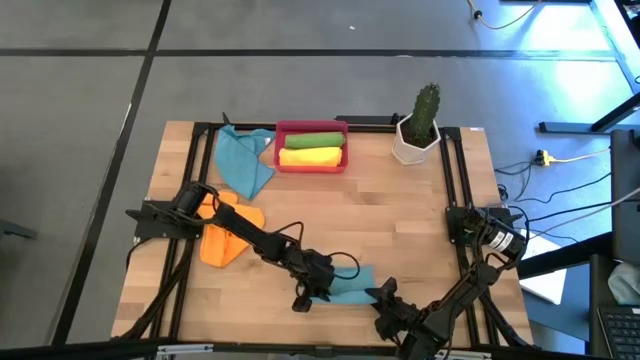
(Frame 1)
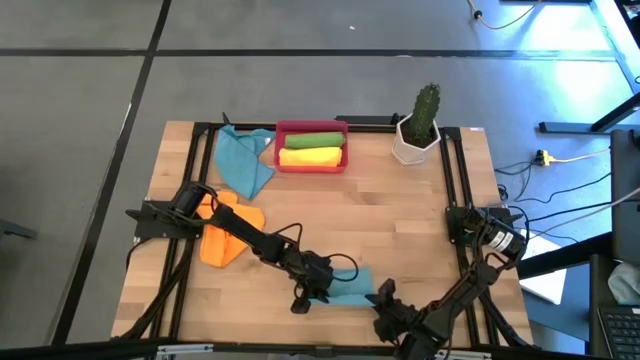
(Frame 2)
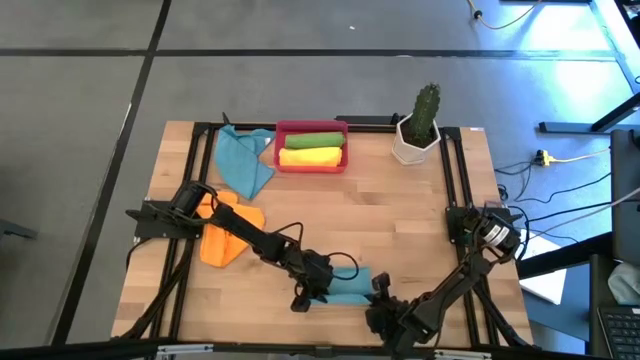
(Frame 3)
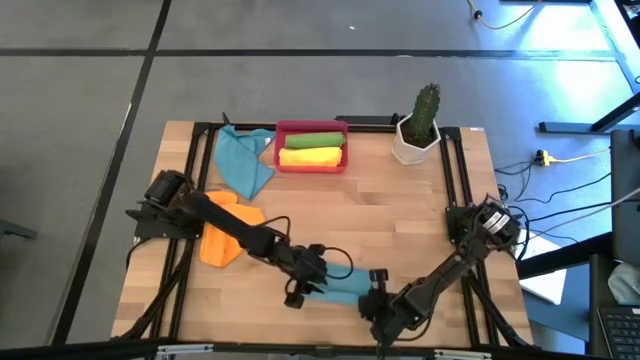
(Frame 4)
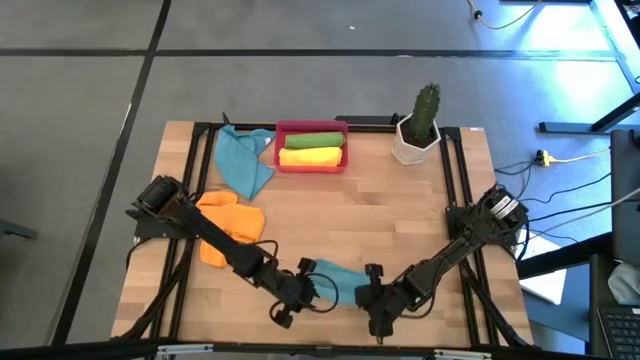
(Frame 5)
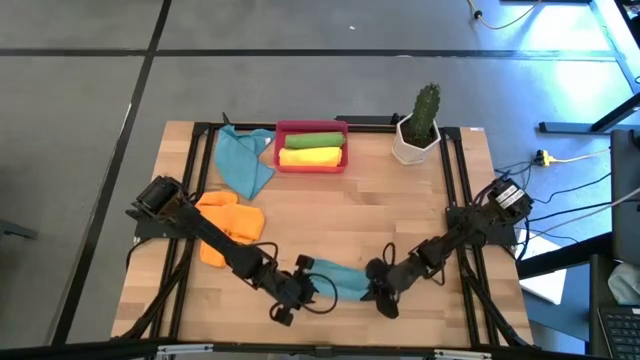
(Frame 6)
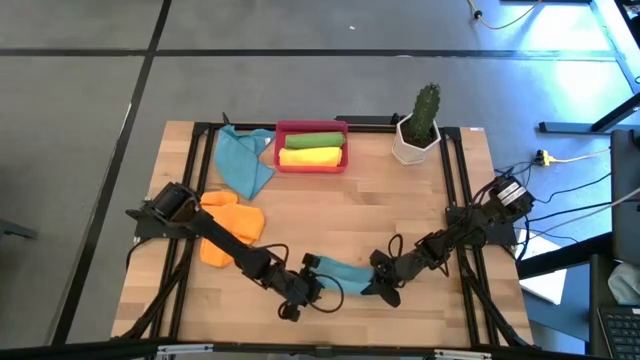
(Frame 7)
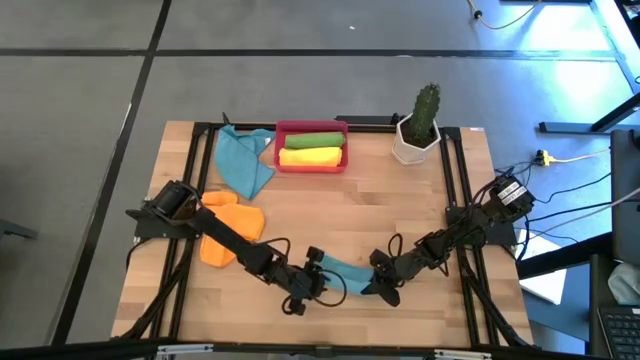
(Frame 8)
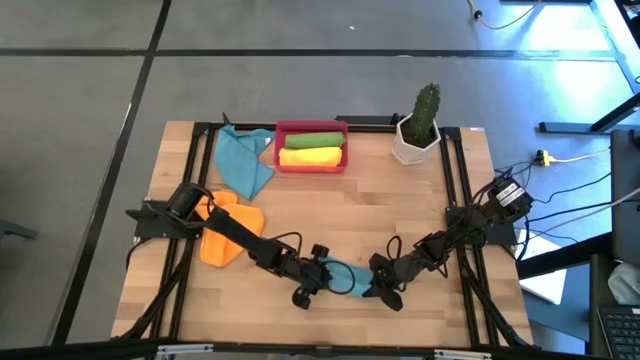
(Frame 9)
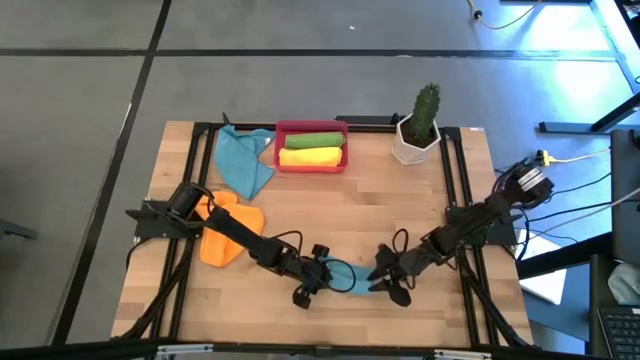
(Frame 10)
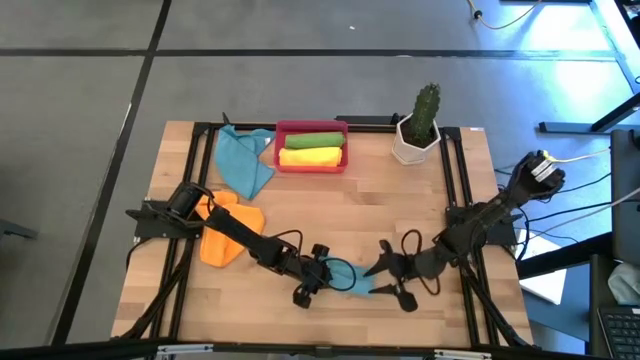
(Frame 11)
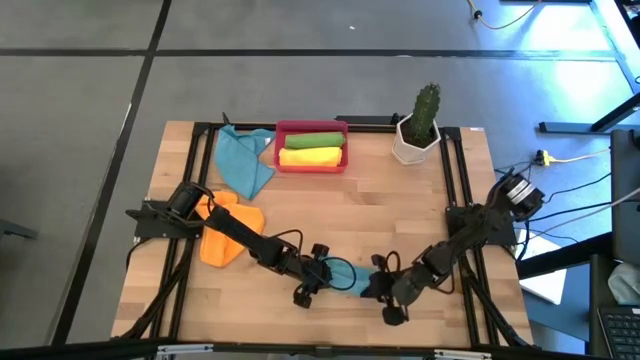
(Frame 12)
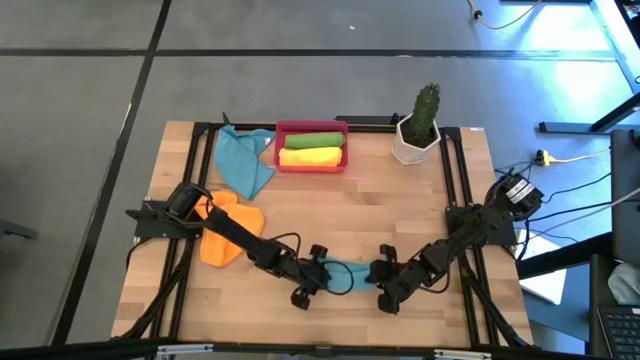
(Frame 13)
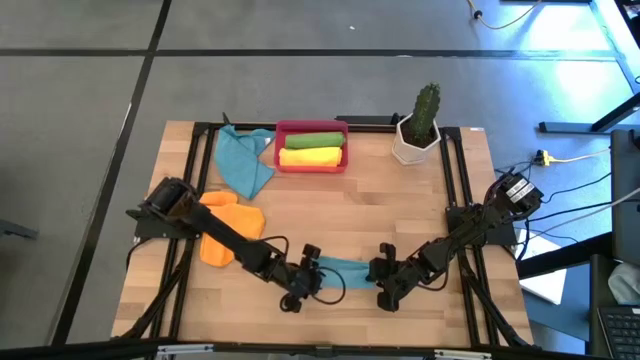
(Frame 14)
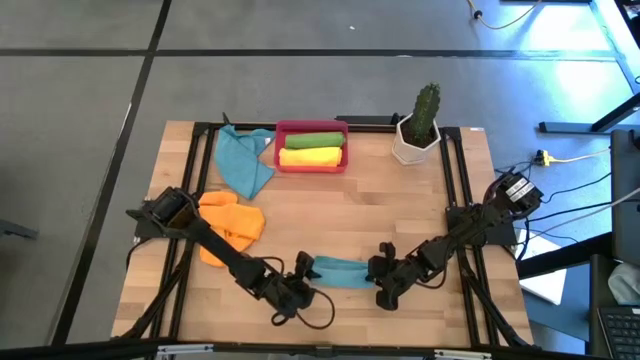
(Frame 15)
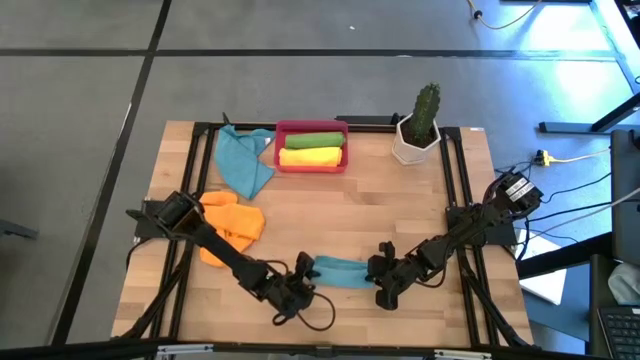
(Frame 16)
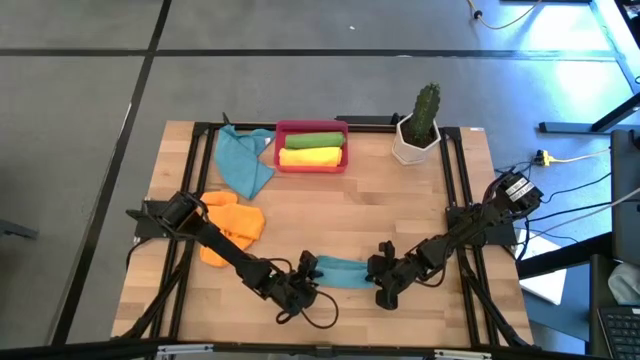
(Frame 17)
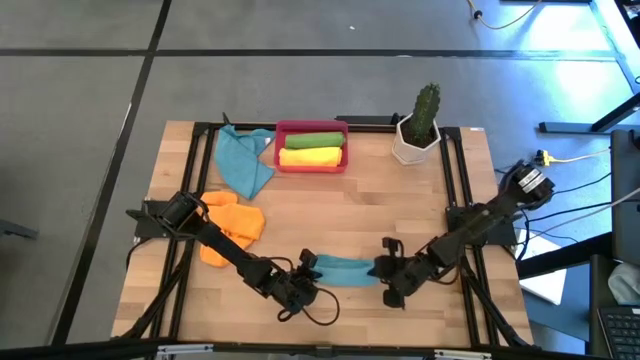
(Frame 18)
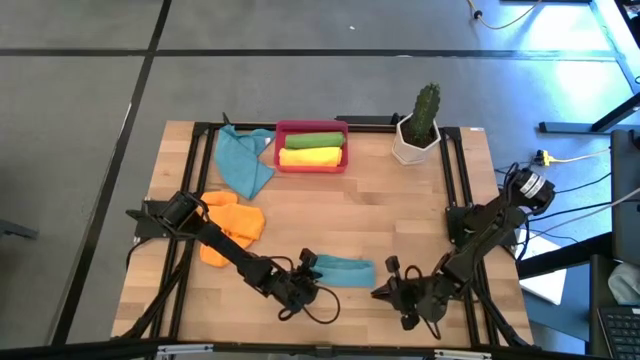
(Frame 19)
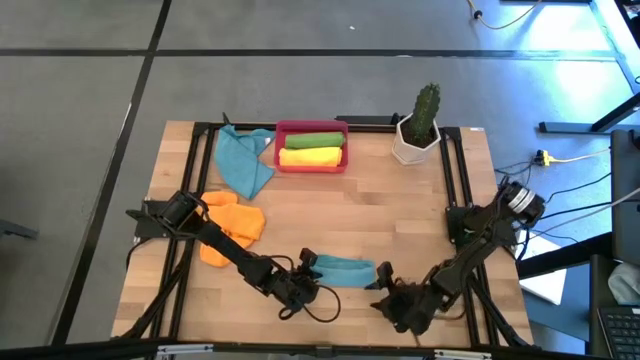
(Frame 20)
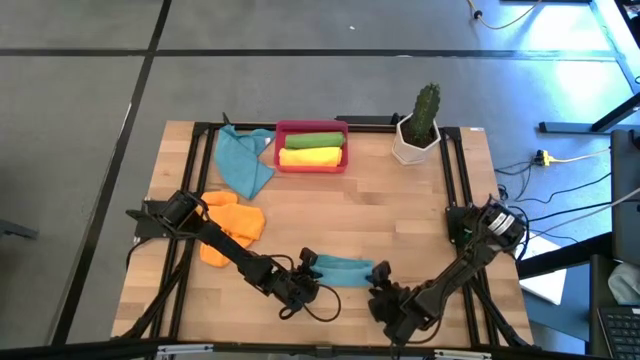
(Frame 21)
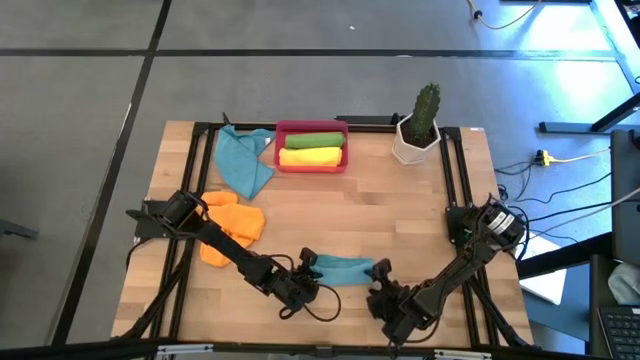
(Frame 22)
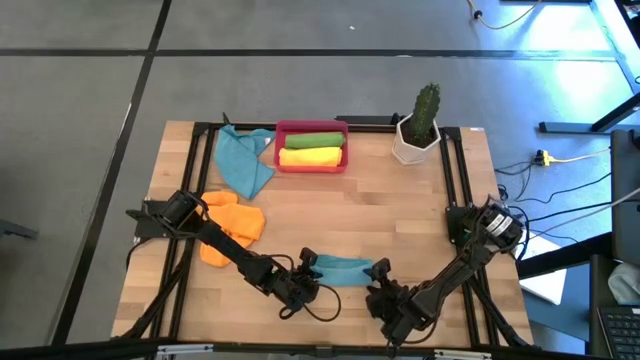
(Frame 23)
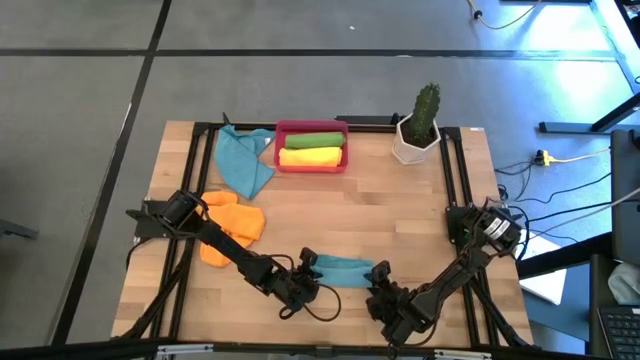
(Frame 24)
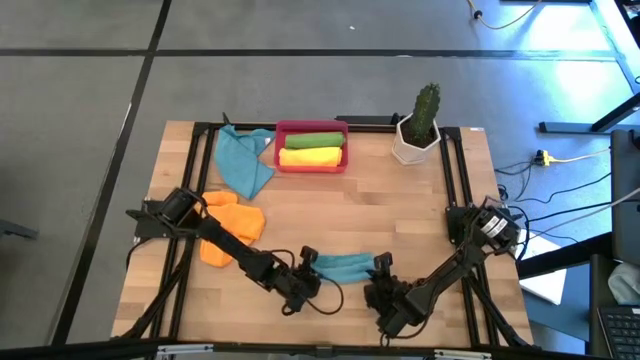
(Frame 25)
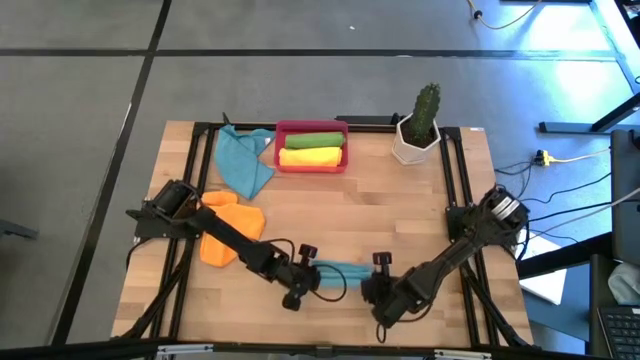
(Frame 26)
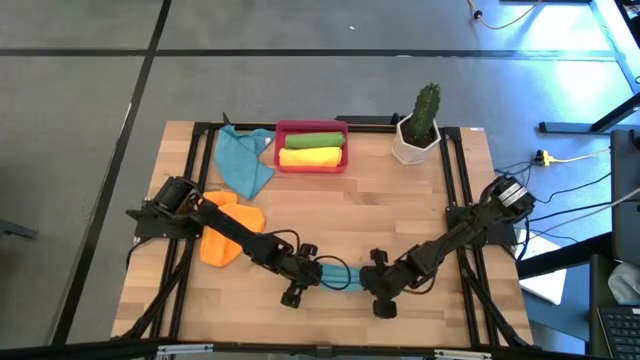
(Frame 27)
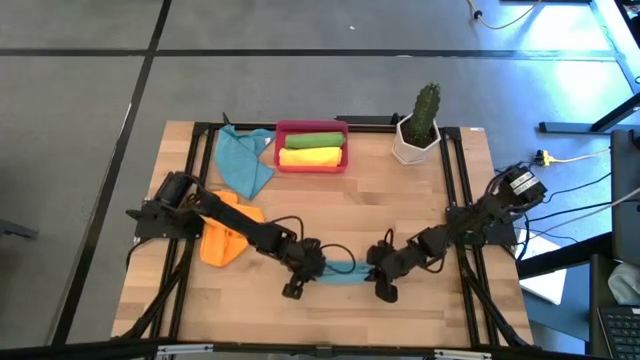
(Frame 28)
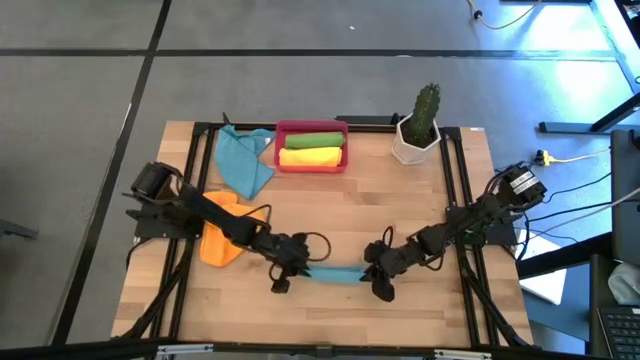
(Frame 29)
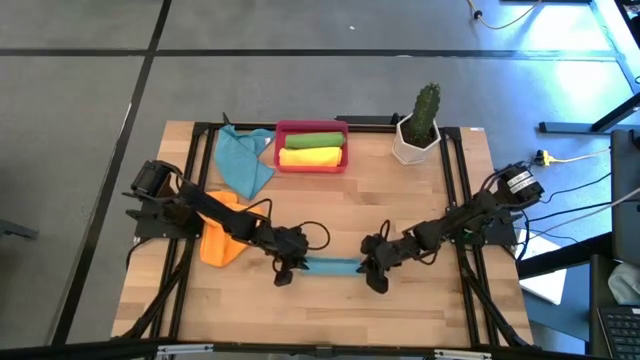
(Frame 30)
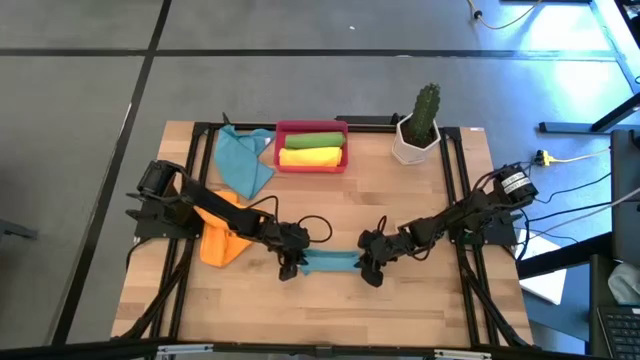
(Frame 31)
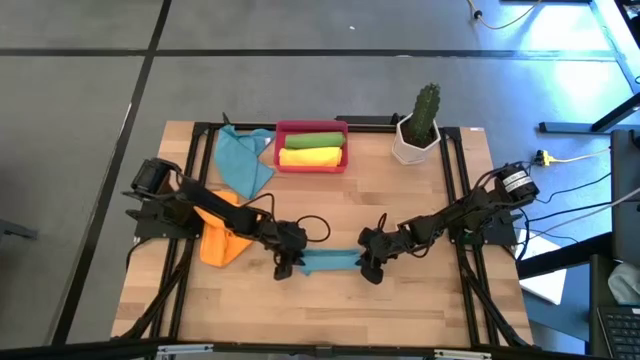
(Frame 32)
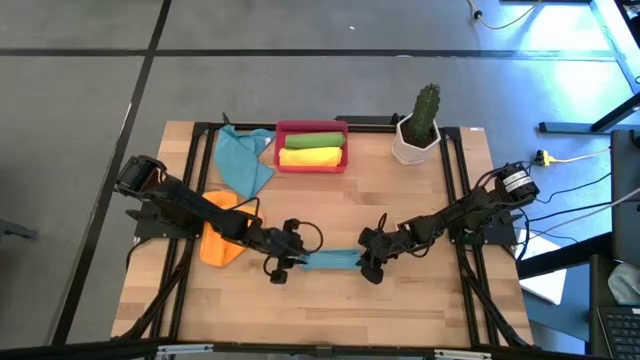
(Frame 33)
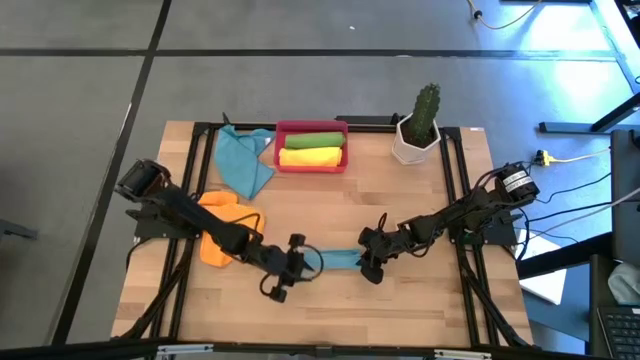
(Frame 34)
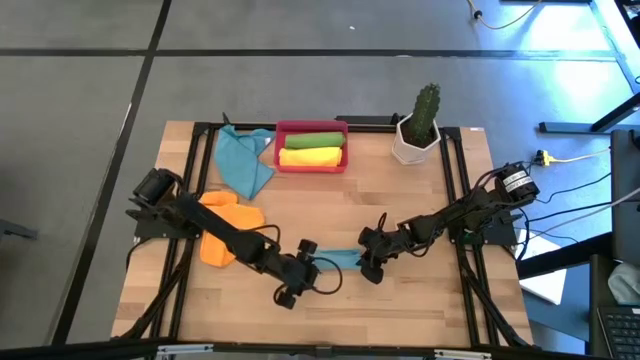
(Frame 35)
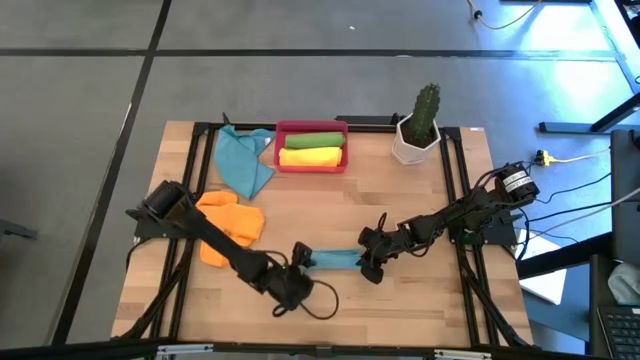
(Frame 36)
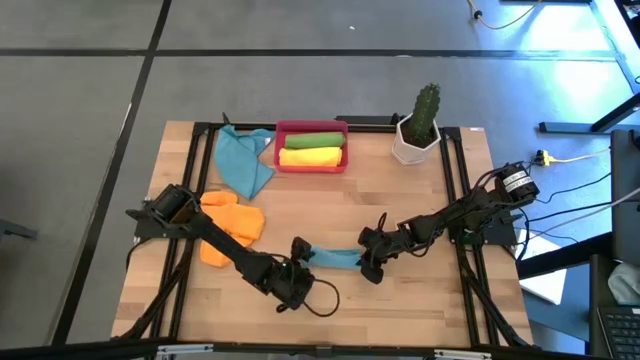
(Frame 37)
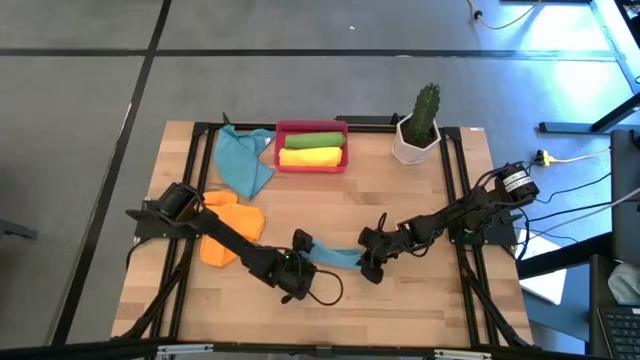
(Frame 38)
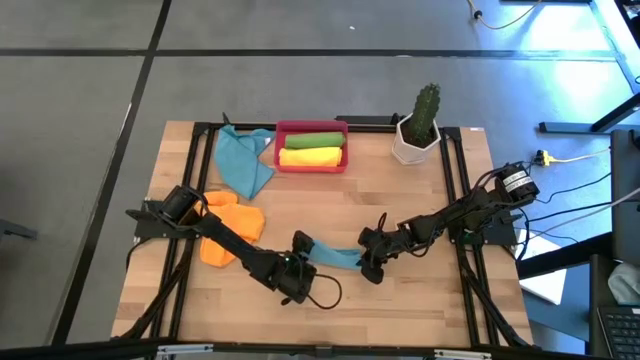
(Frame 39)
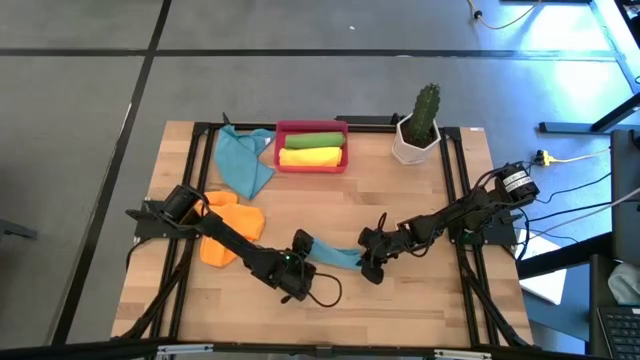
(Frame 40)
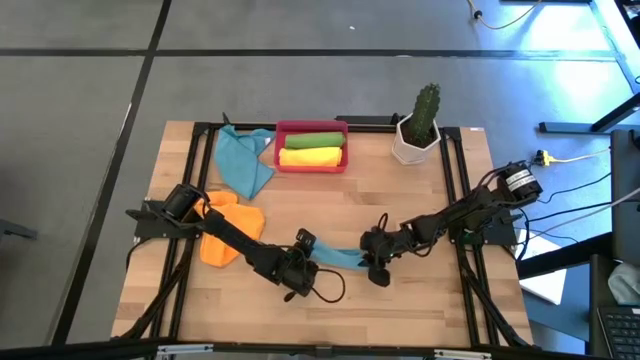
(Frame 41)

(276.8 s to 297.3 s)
Task: Roll microfiber towels into tight, uniform cylinder then place into a basket
Roll the bottom blue towel

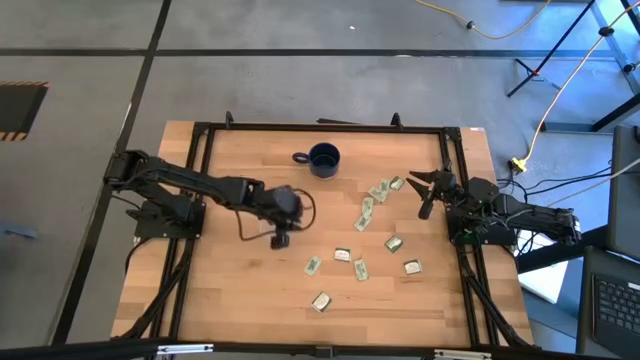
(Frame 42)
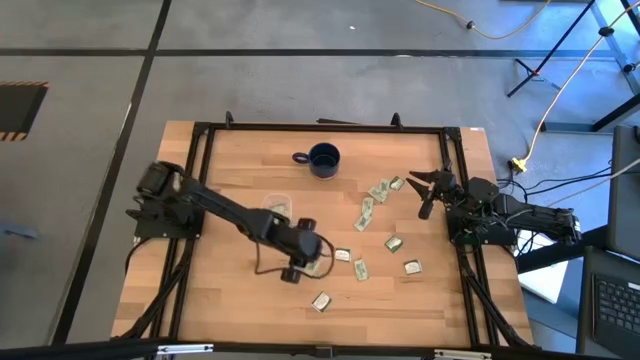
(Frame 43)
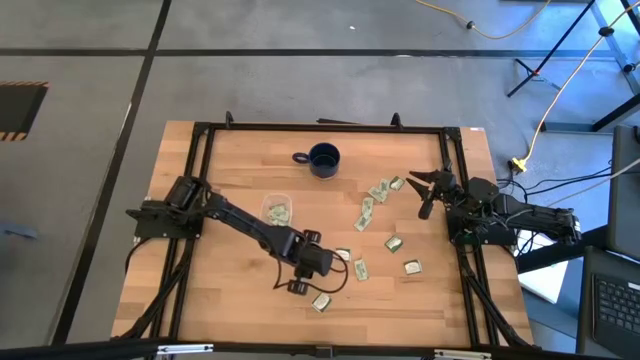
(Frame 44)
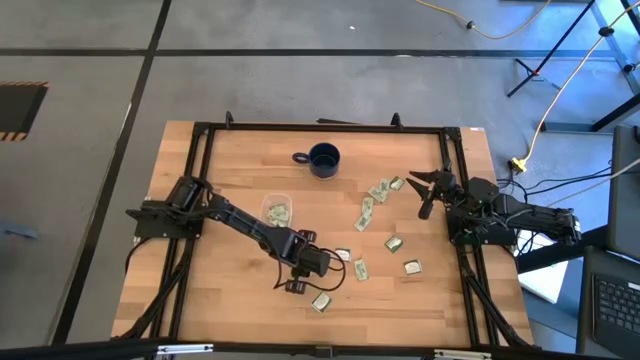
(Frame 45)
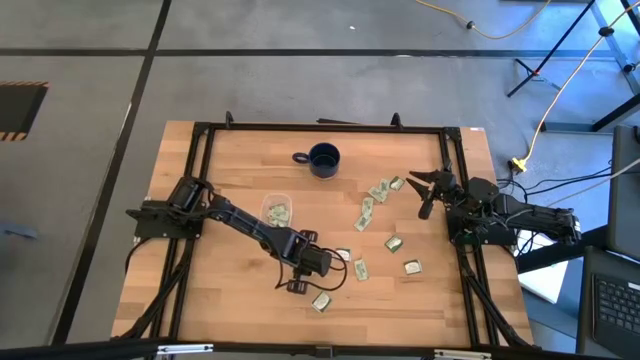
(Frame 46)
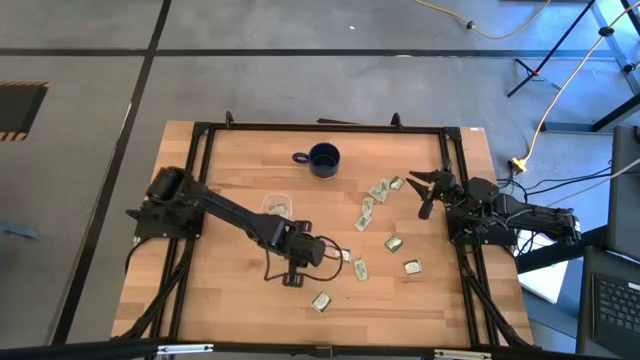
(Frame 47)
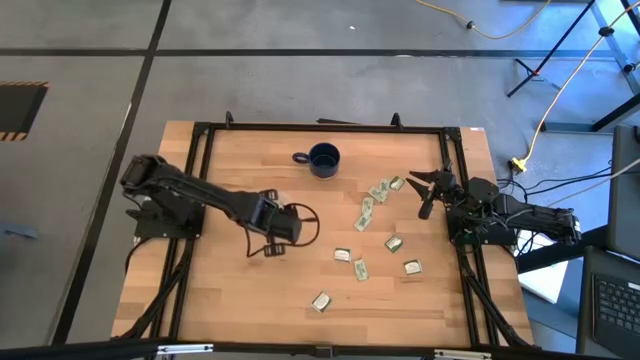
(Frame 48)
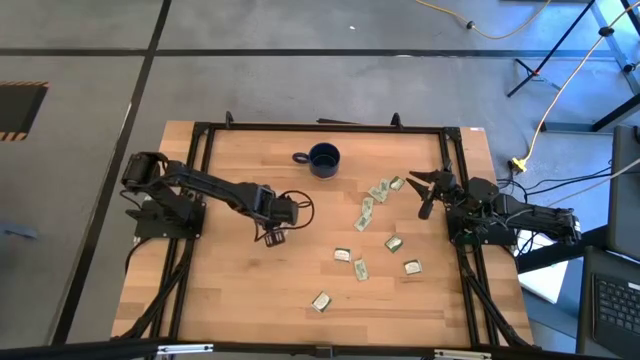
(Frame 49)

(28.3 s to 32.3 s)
Task: Pick and place Stevia / Truvia into bins
Put the white stevia packet into the transparent container
